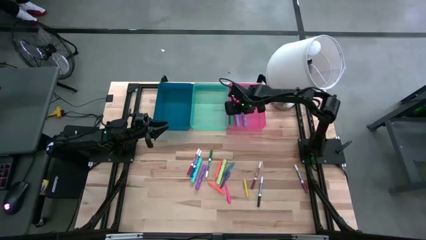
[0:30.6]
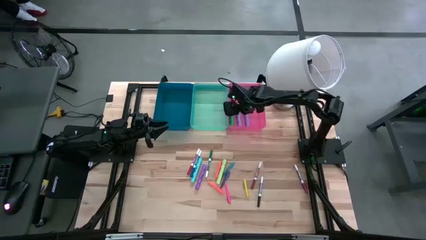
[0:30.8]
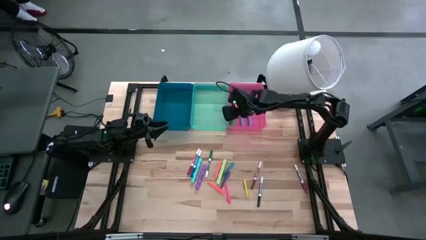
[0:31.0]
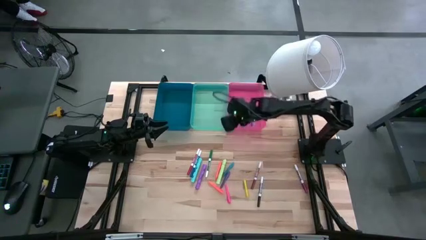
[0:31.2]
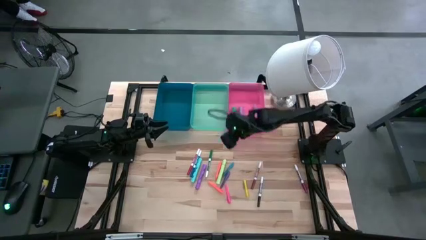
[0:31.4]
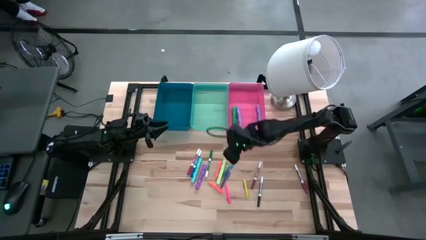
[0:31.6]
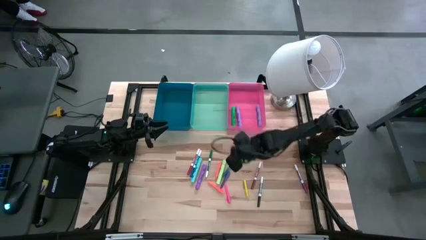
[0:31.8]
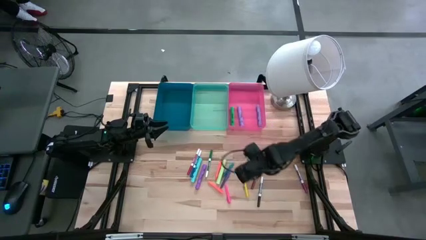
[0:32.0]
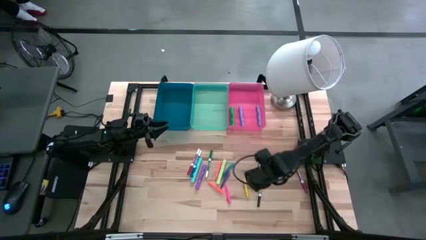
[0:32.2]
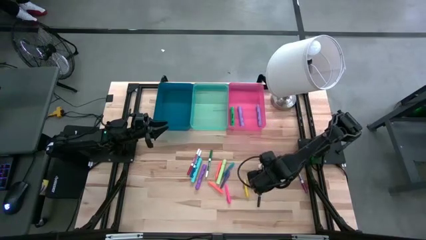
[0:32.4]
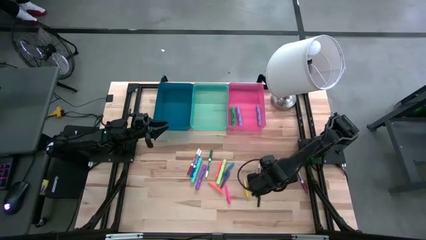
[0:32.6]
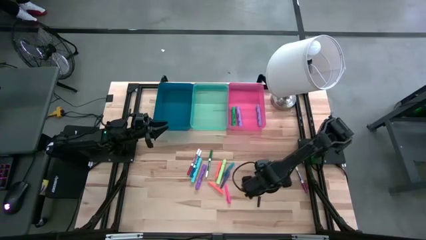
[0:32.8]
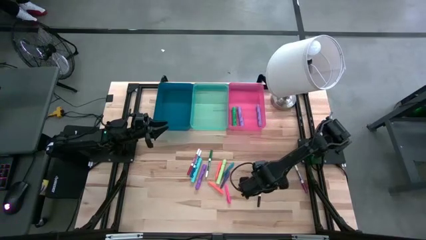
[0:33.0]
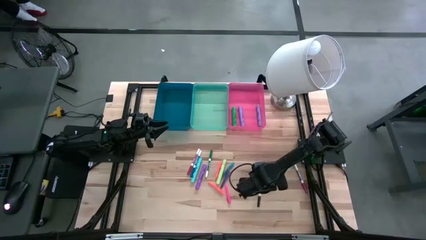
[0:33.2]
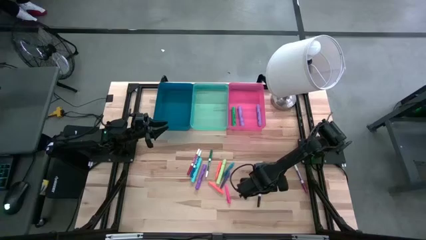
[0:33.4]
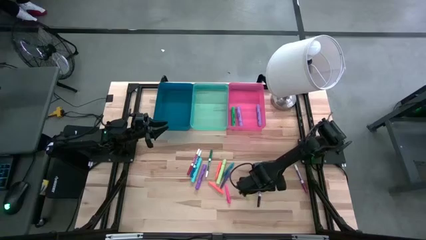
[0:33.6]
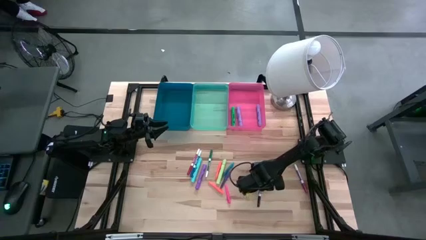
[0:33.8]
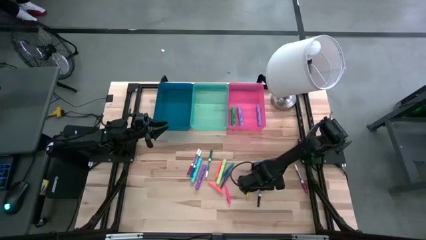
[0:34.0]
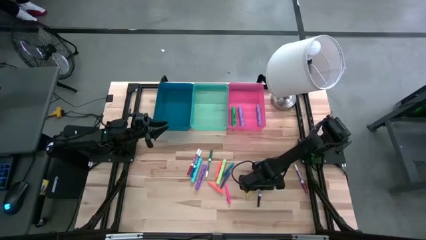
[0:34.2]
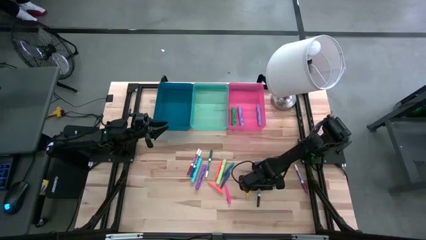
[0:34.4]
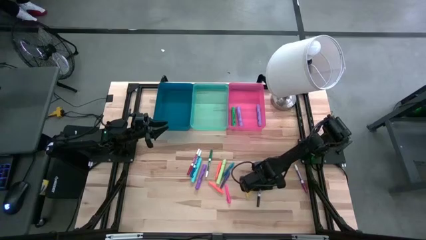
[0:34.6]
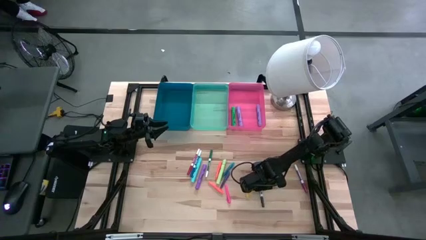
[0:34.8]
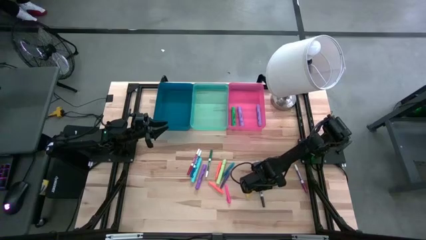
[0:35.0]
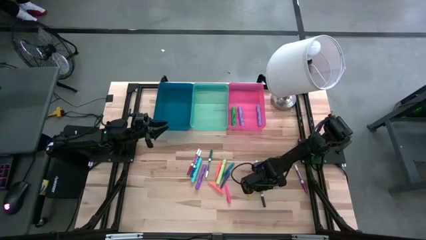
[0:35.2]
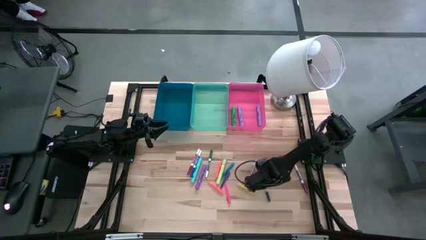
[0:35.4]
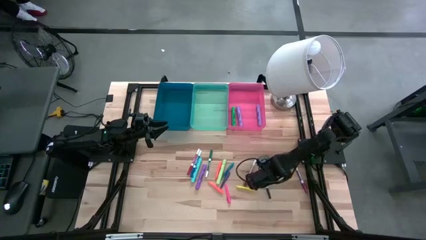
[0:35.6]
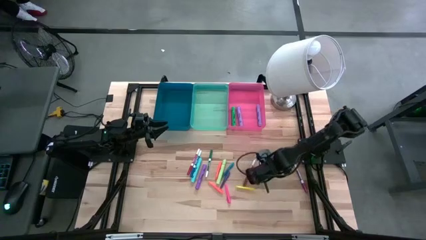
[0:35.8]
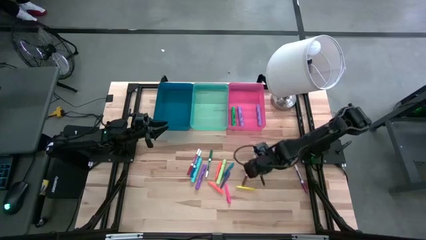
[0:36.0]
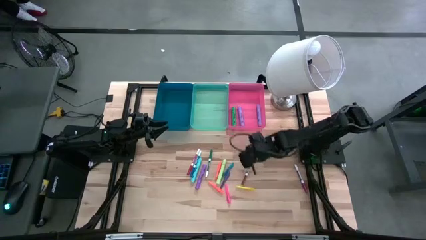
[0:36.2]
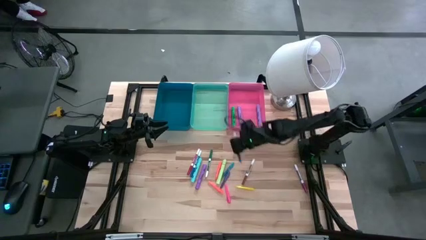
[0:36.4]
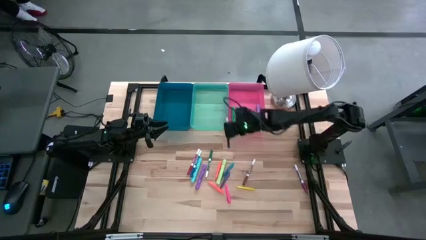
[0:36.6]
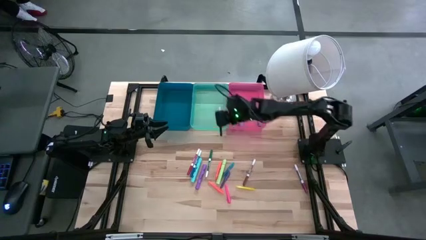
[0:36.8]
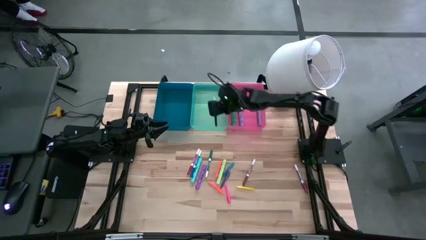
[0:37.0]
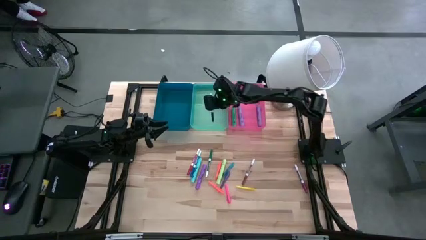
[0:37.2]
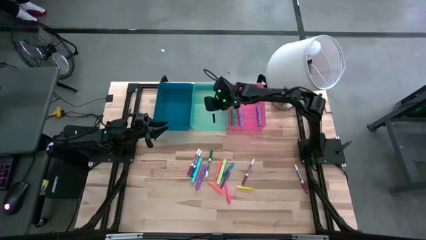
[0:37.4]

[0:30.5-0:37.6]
Task: Pick & Place Markers
Put the black marker pen into the green bin

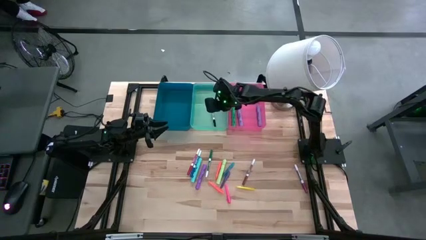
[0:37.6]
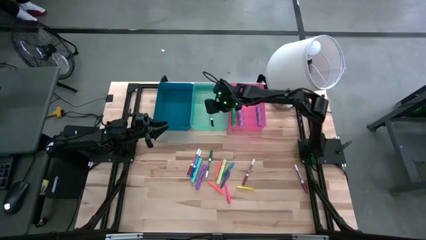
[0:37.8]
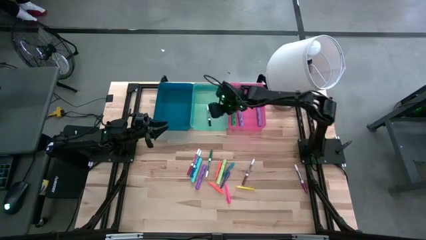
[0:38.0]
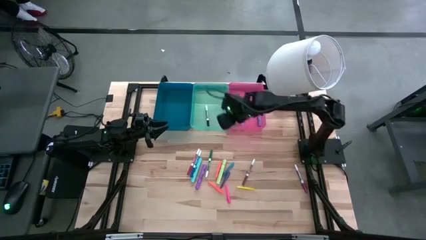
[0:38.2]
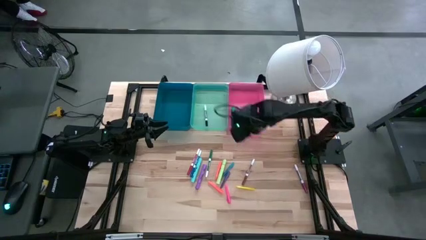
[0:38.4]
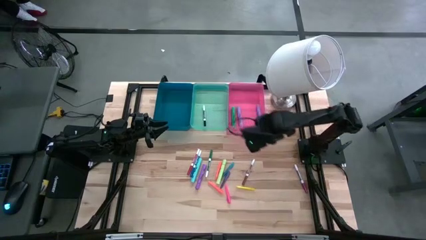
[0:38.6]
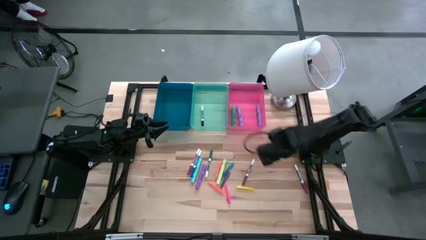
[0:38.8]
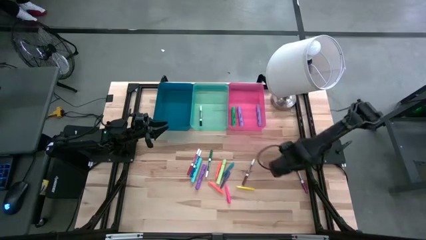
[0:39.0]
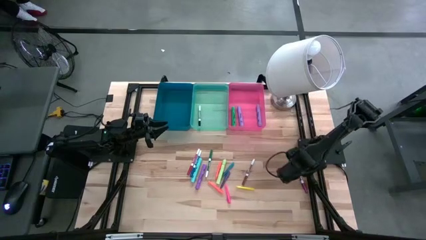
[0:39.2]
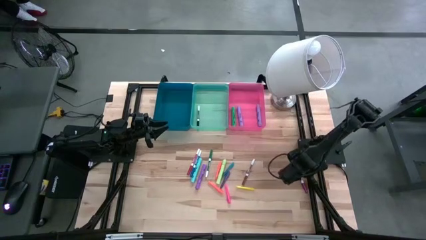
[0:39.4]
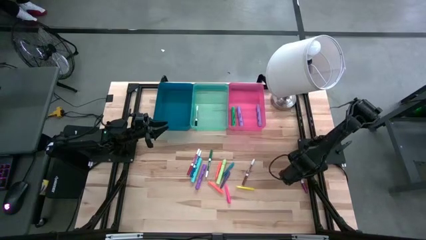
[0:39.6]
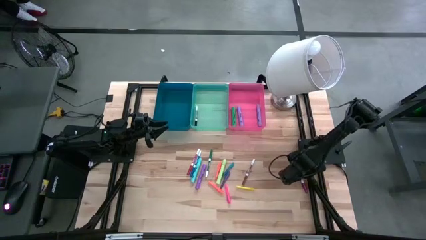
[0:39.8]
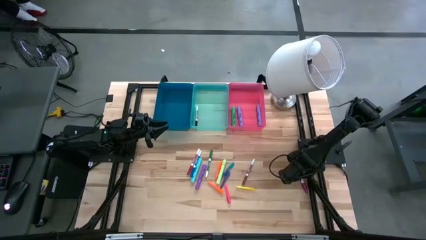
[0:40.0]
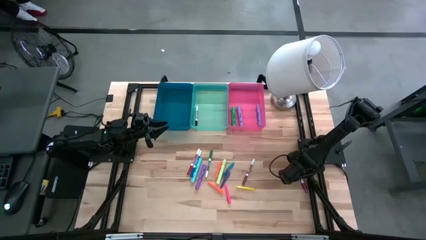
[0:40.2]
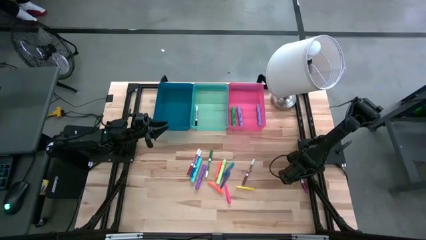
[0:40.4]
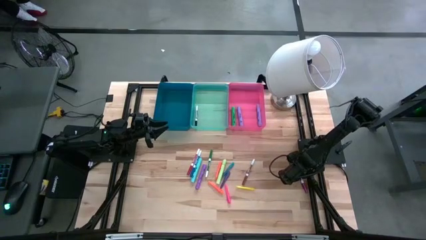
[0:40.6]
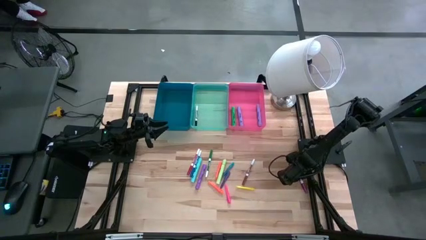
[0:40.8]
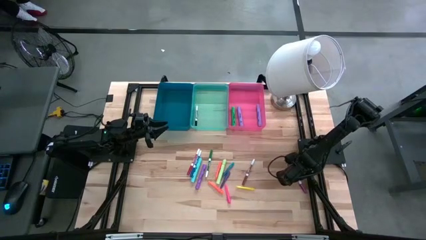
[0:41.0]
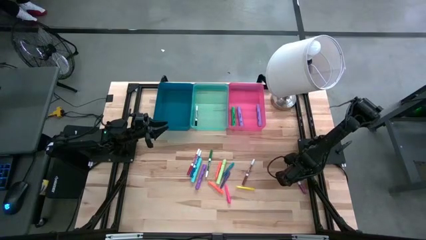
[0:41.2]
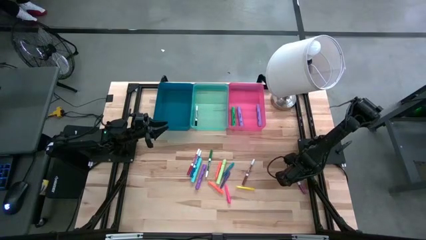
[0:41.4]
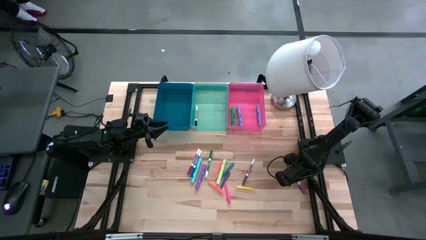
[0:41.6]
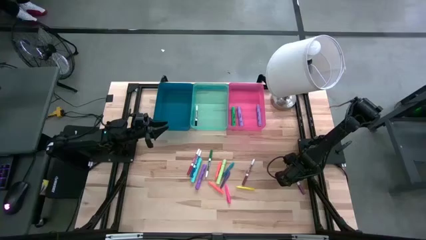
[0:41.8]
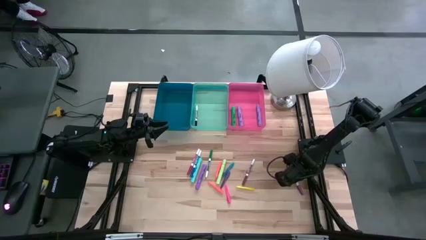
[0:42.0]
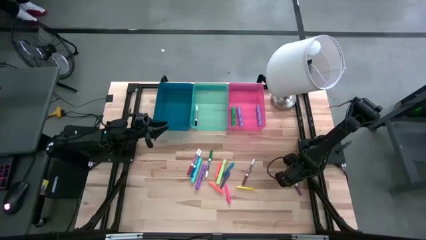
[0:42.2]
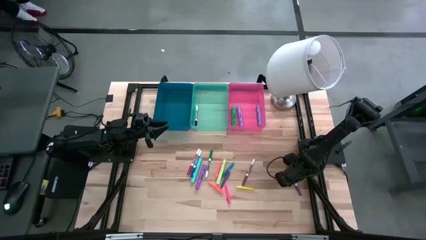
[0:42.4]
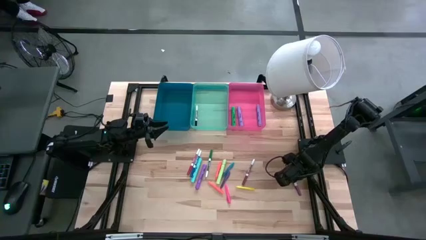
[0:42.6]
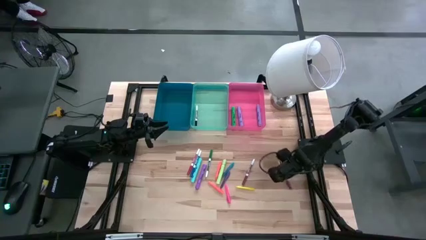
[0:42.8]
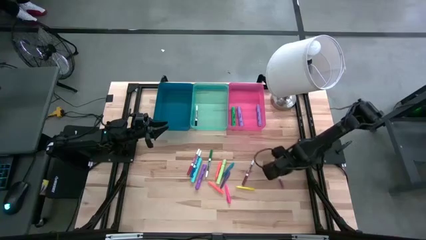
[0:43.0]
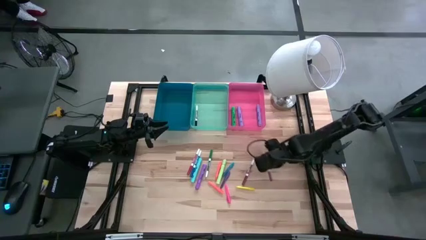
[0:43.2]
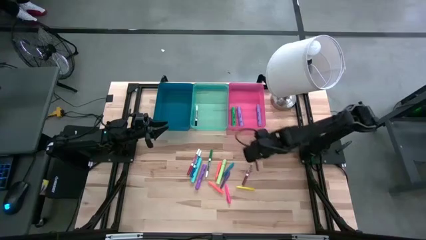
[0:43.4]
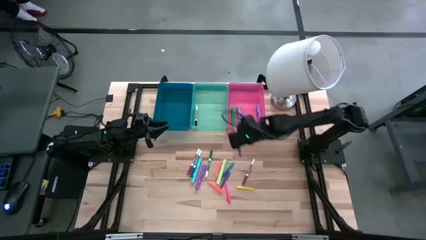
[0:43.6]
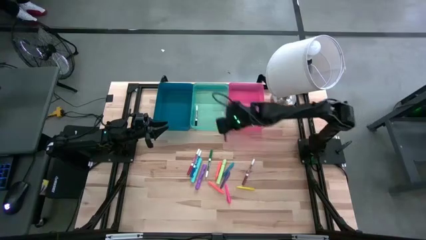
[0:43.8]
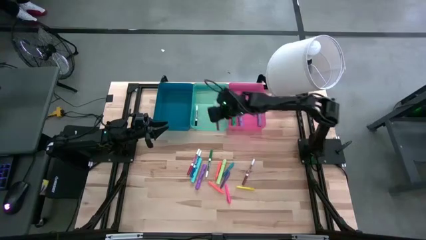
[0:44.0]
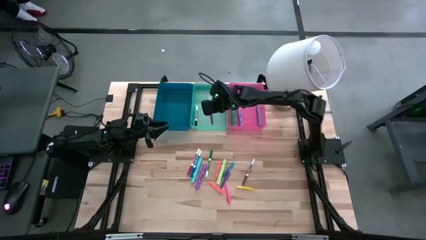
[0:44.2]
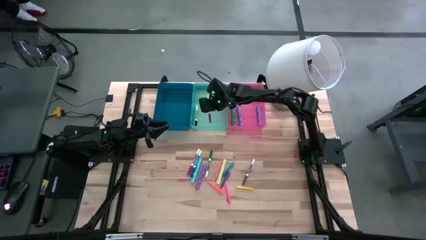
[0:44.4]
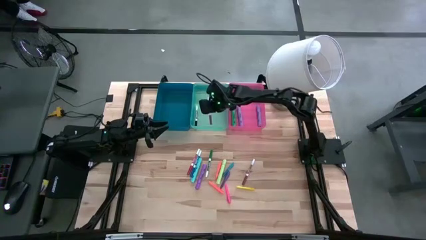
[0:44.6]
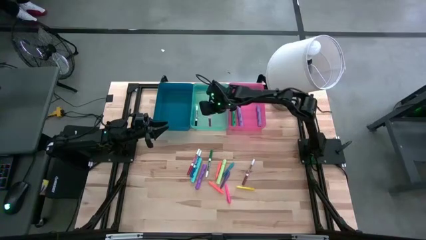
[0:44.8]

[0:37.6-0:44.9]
Put the purple marker pen into the green bin

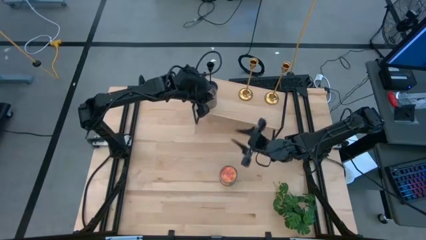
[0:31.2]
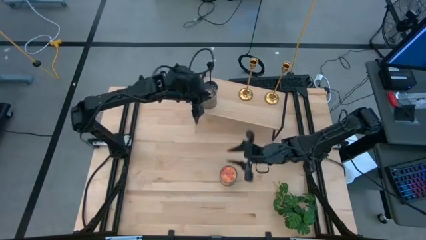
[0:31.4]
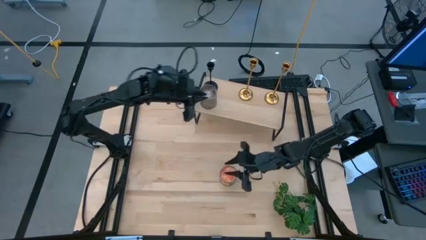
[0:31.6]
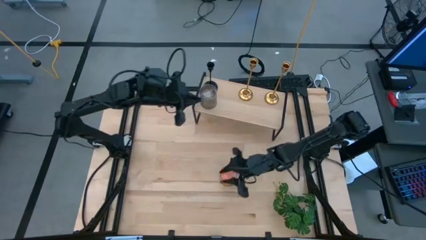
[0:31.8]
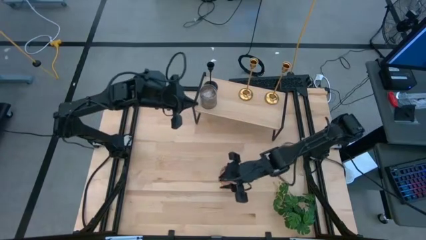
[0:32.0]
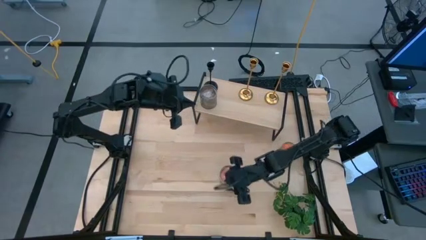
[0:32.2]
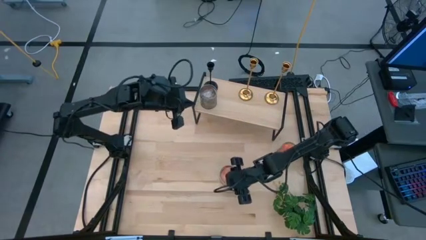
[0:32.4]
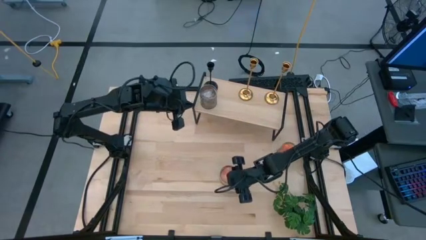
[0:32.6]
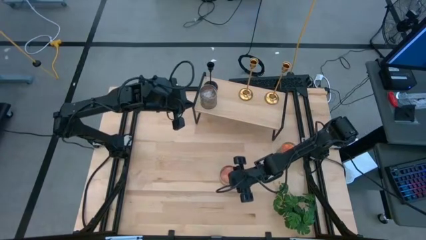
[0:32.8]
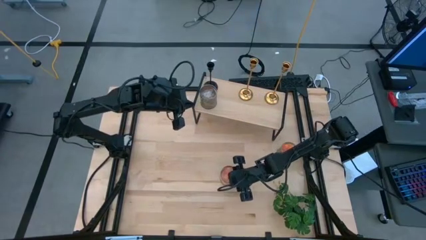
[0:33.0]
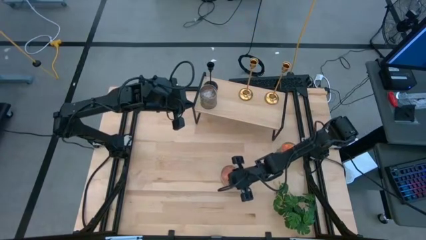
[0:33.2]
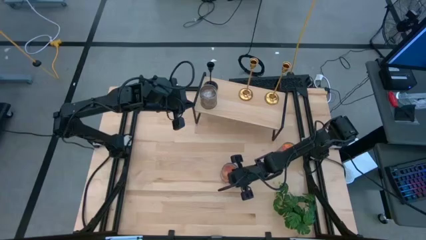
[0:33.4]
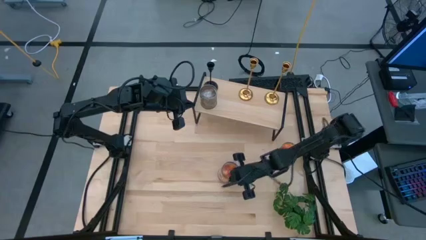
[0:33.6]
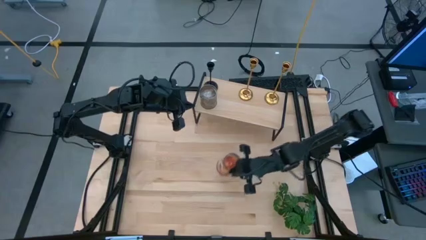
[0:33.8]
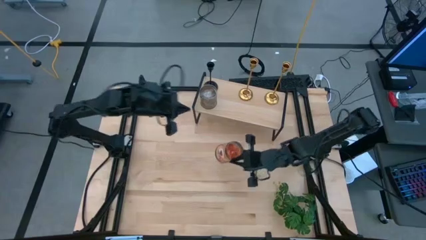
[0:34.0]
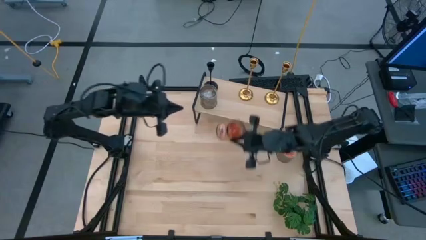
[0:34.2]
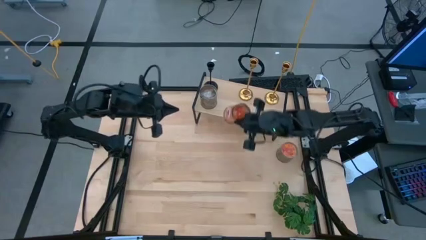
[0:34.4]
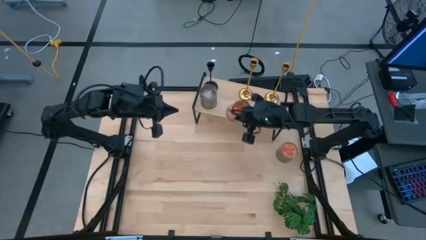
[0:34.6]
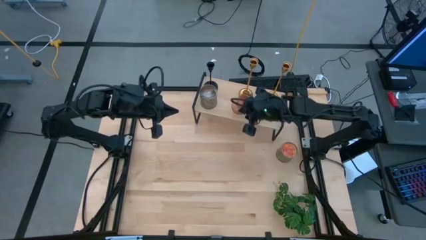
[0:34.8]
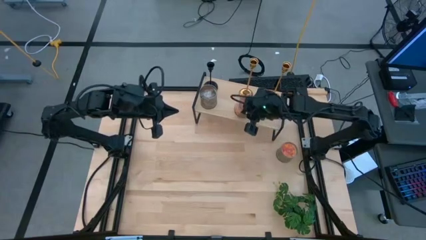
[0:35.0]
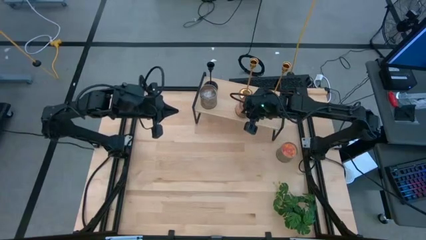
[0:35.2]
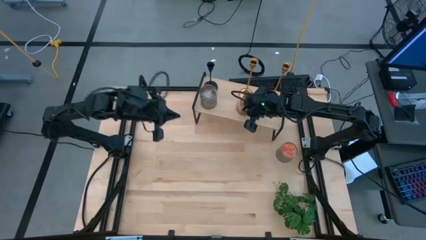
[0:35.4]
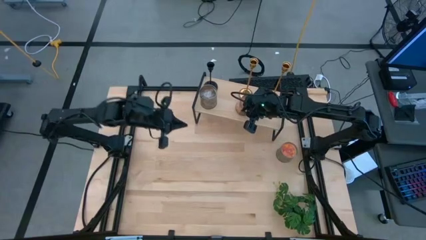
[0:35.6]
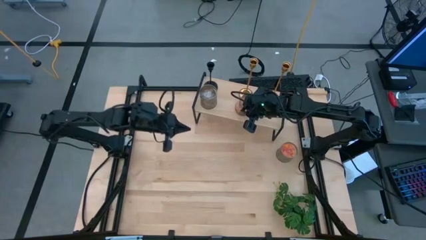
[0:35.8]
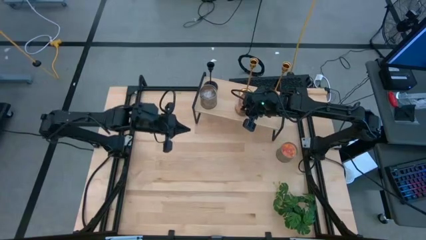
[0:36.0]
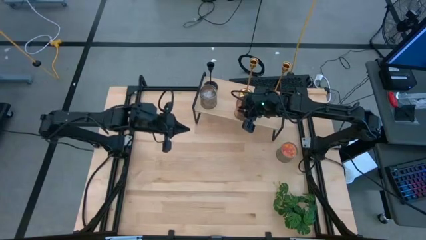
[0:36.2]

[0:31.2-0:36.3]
Task: Pick & Place candle stick holders
Put the bottom orange scented candle on the shelf
